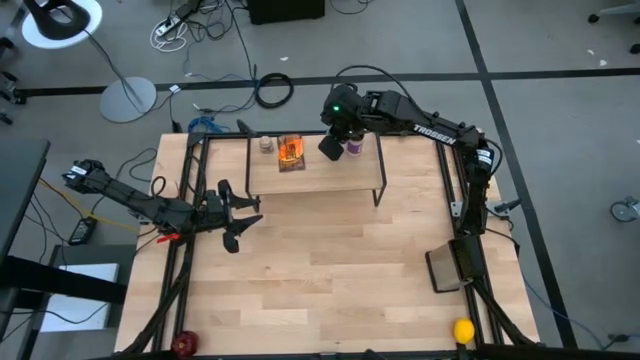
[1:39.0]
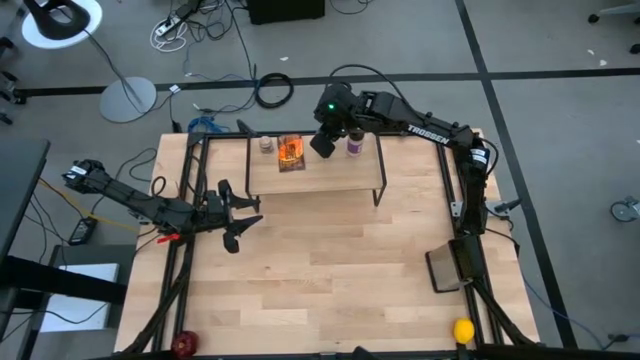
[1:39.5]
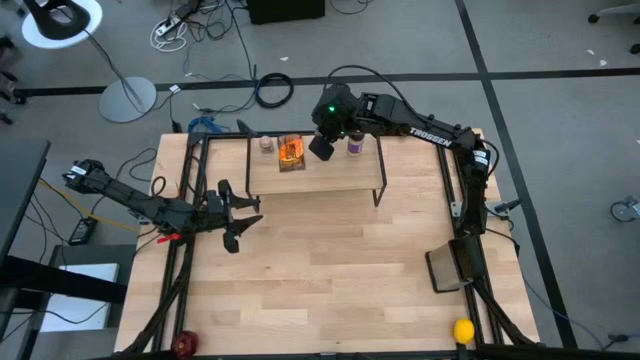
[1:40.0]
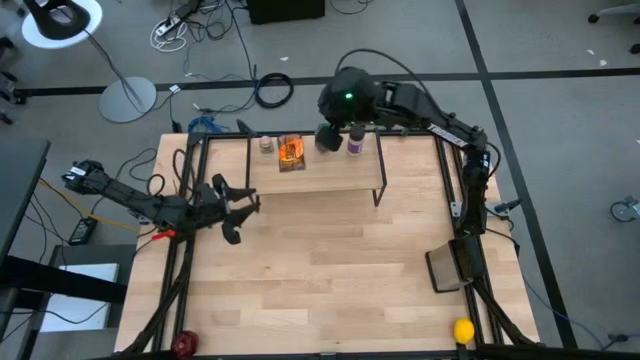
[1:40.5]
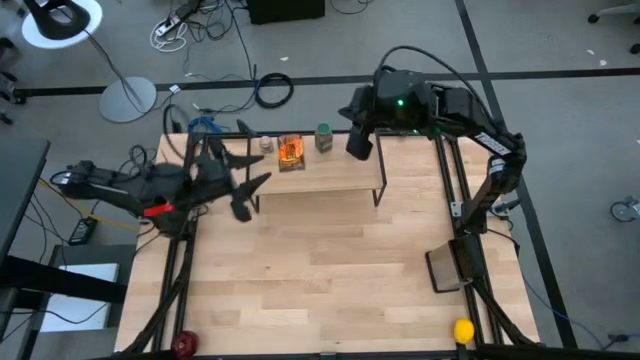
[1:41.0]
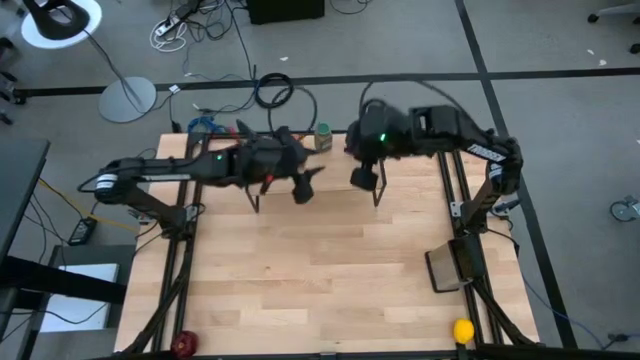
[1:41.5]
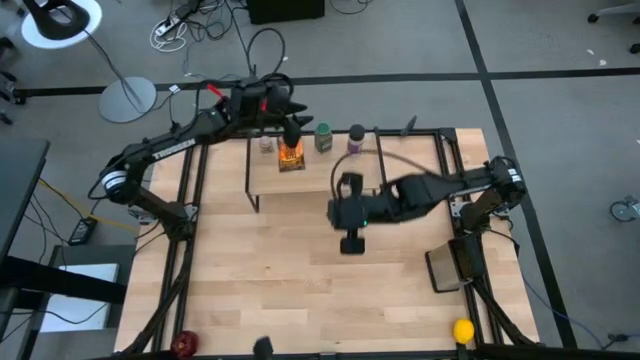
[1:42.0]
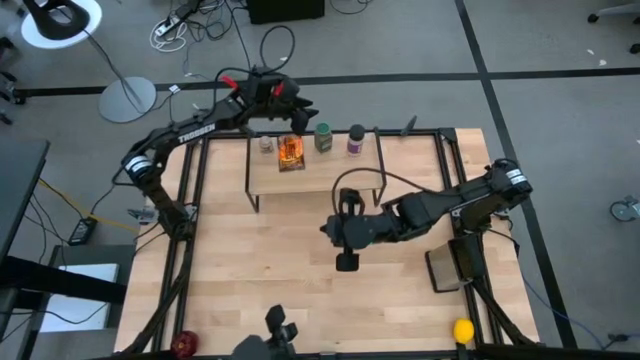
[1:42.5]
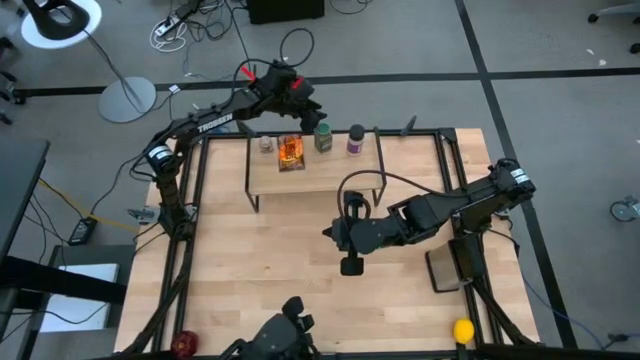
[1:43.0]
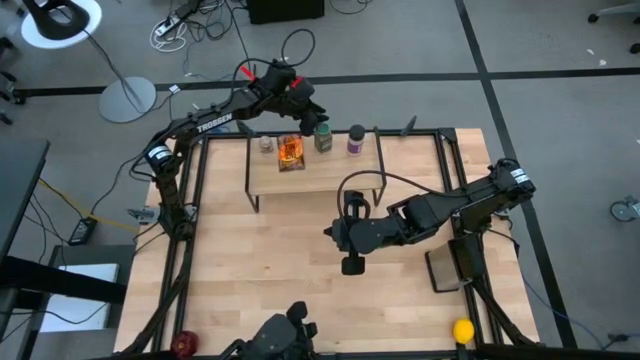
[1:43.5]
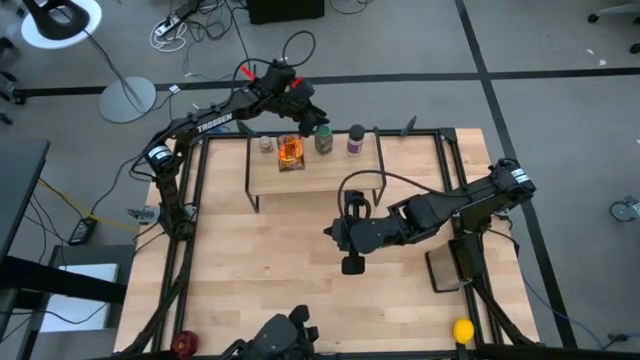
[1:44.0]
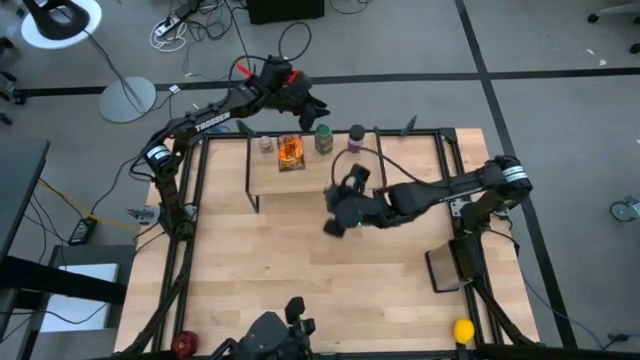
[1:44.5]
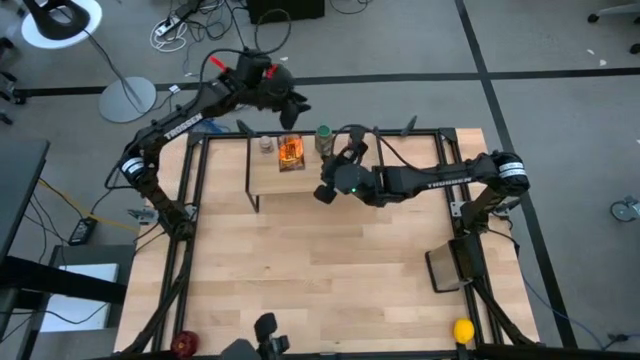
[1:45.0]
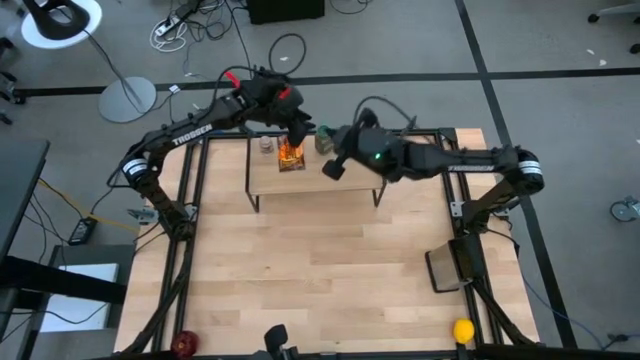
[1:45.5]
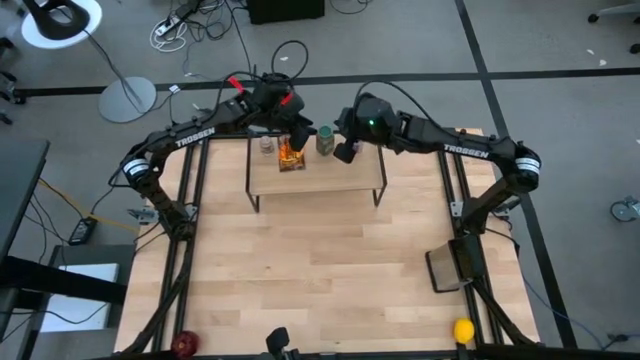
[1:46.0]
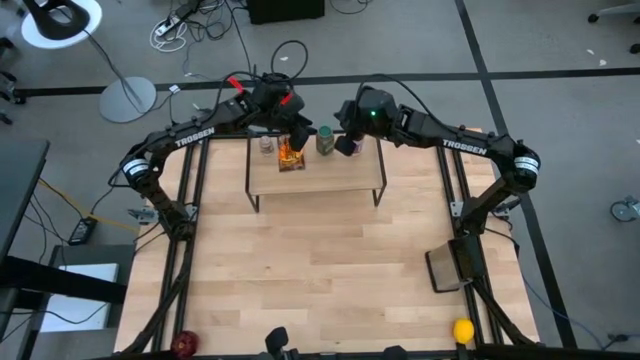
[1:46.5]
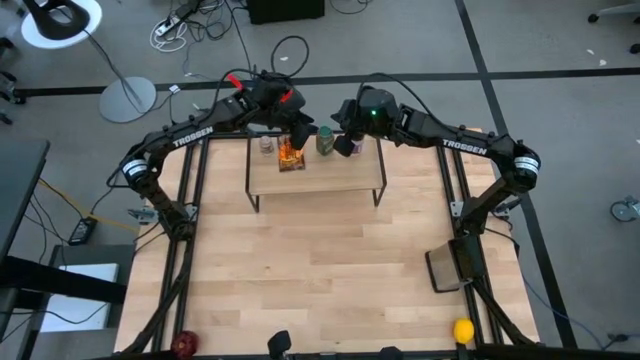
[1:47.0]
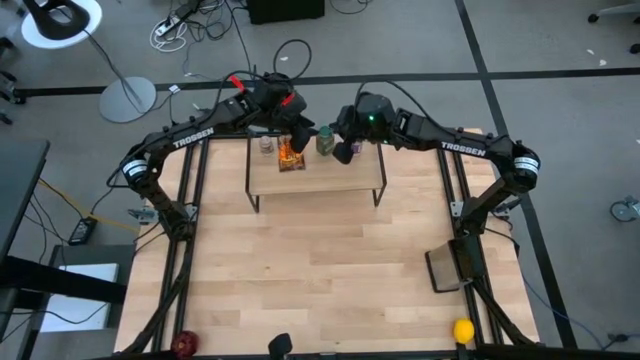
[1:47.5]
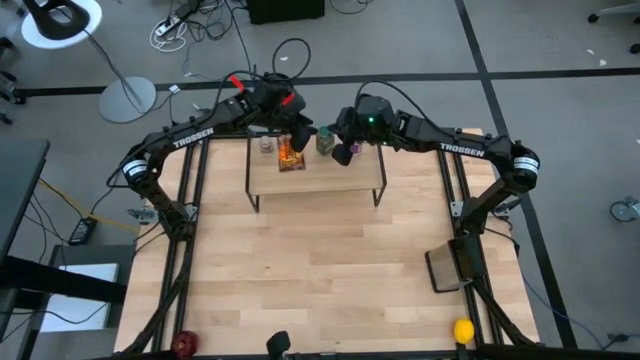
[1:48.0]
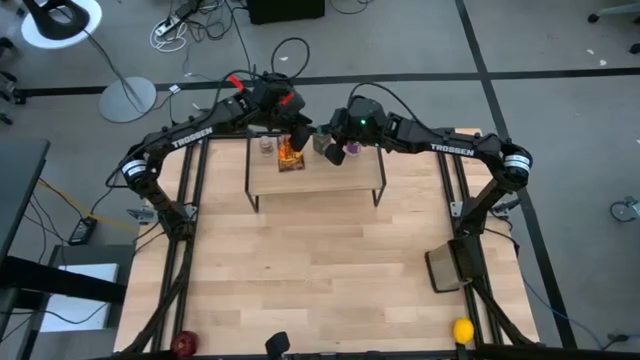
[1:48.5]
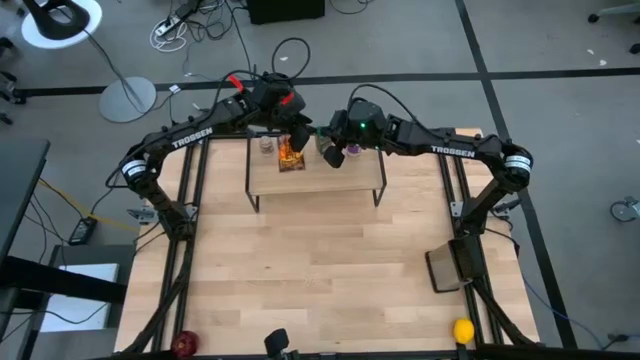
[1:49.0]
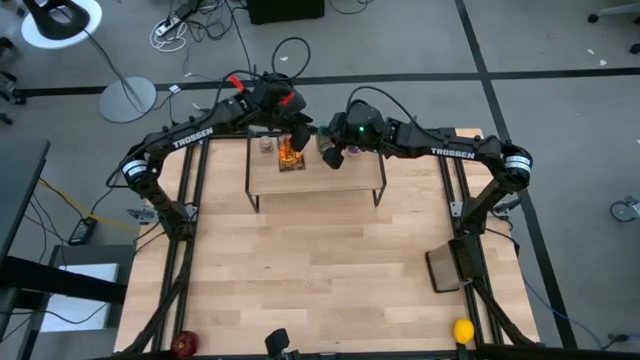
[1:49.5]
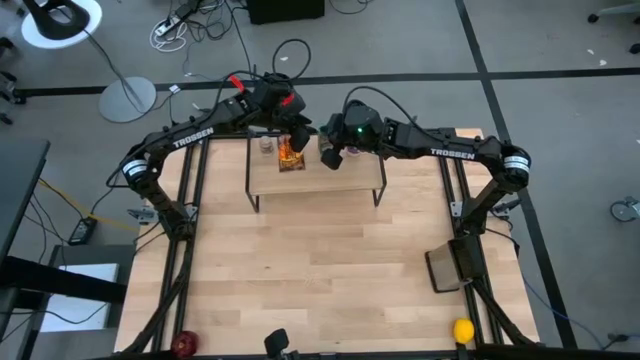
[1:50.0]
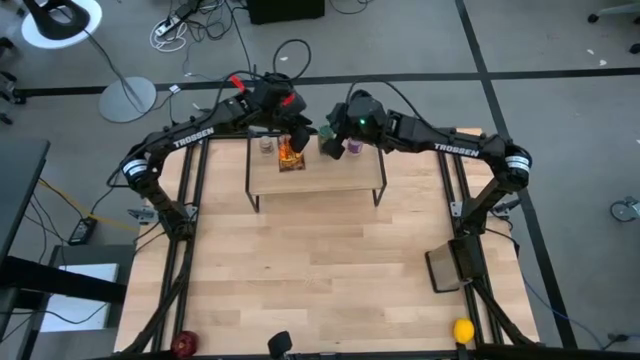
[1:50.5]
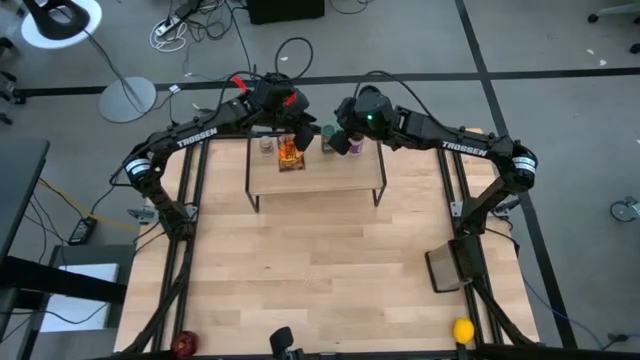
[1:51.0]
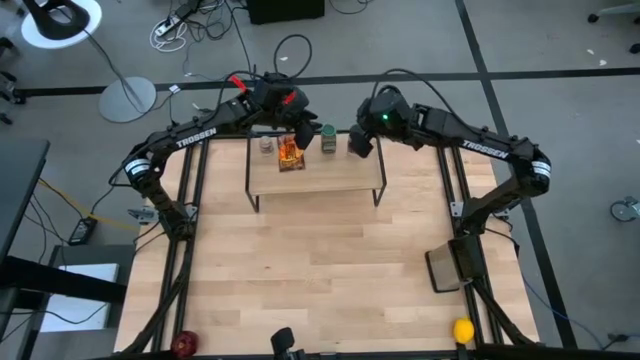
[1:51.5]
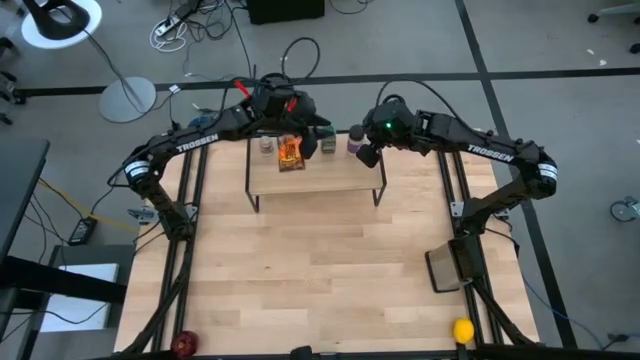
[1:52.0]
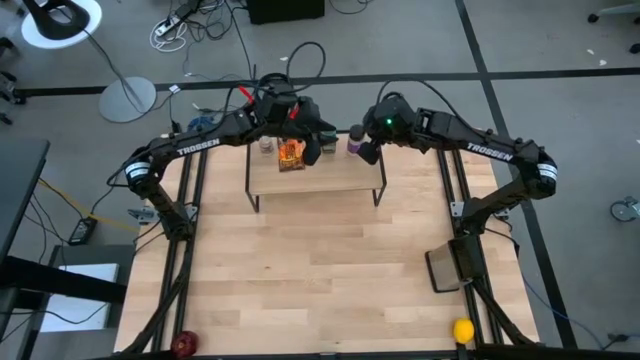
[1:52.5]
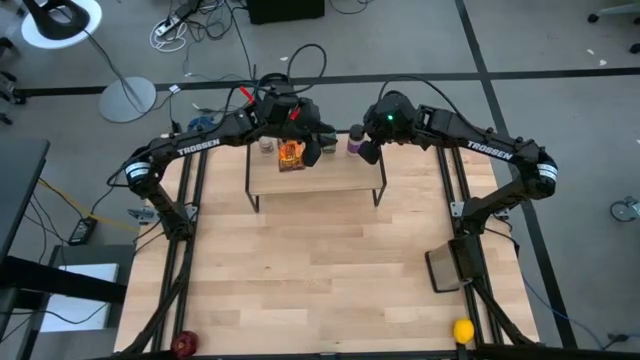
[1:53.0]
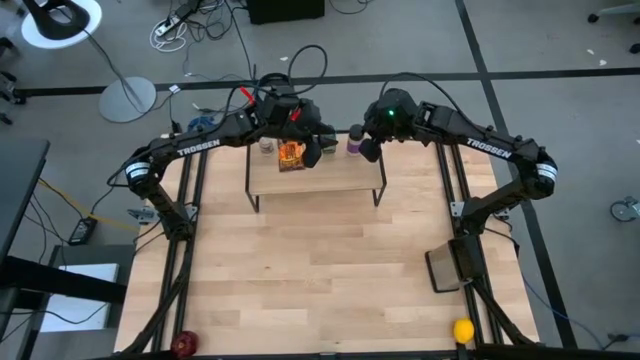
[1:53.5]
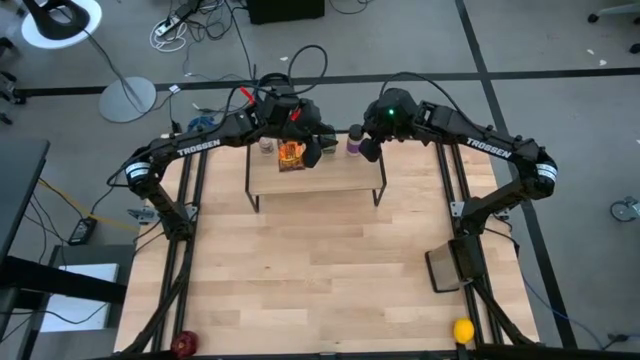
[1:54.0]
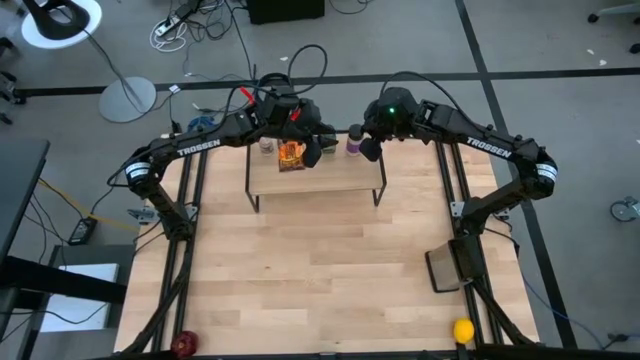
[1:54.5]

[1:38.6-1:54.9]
Task: Shelf spices
Adjust the seasoning bottles on the shelf

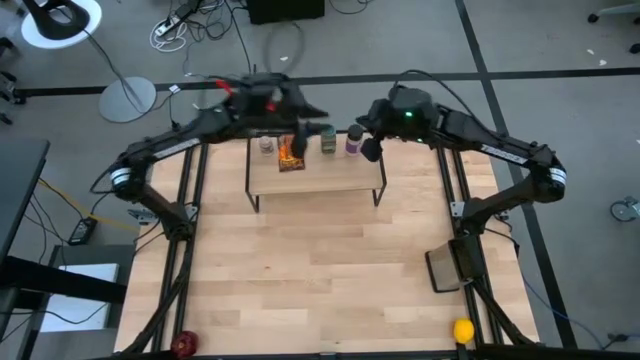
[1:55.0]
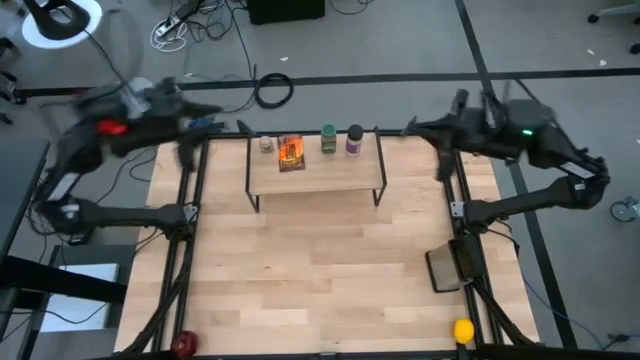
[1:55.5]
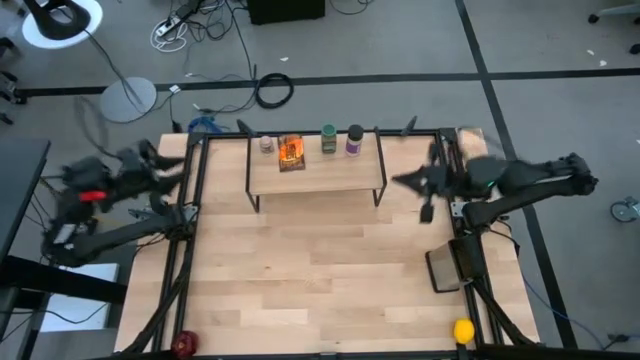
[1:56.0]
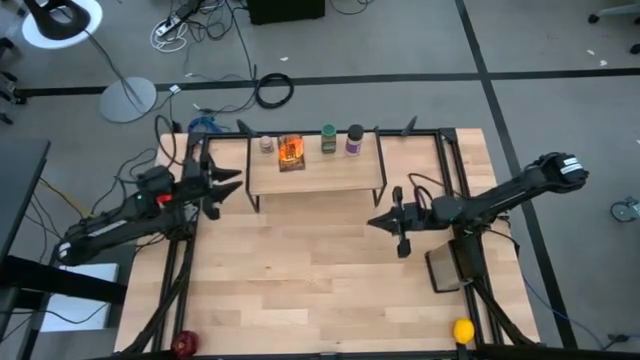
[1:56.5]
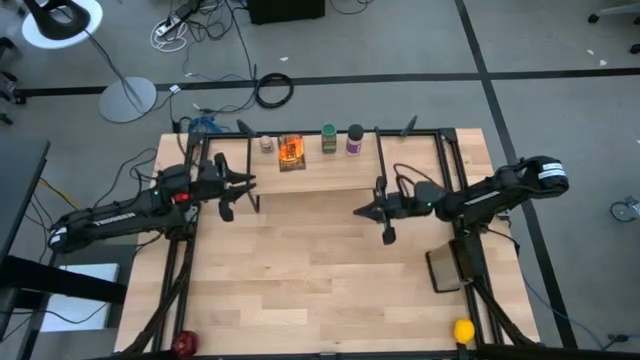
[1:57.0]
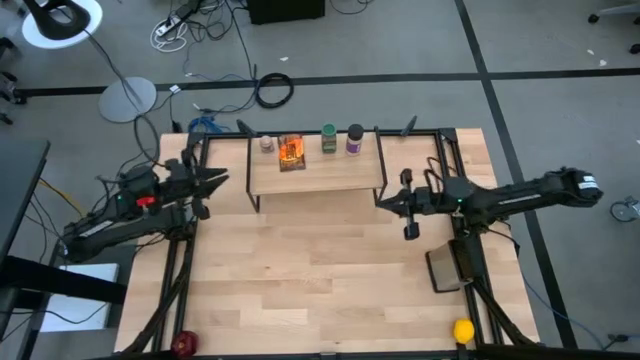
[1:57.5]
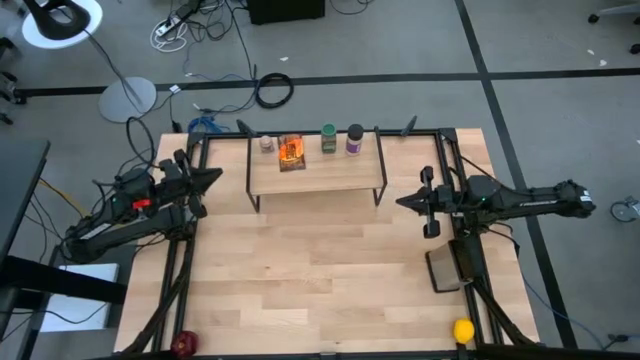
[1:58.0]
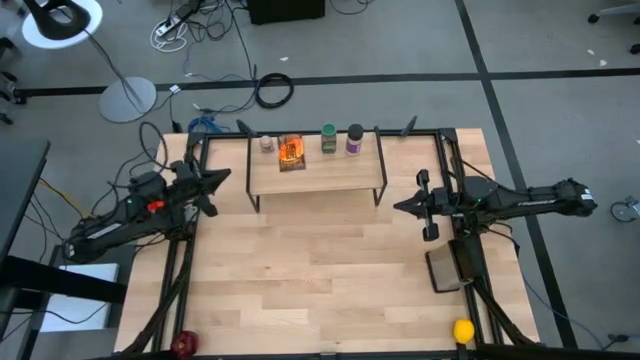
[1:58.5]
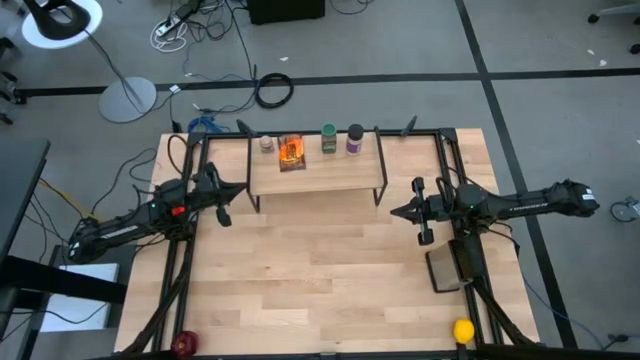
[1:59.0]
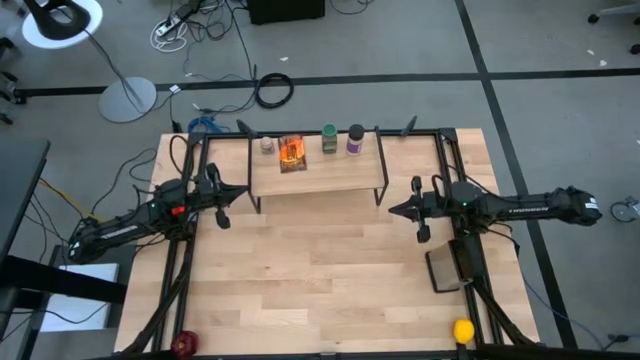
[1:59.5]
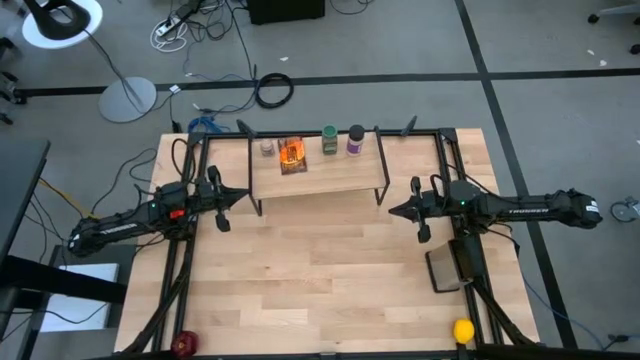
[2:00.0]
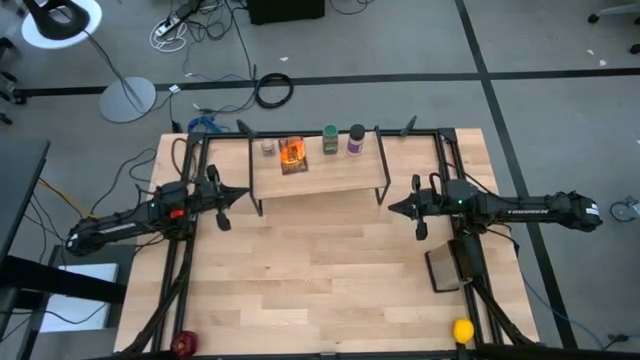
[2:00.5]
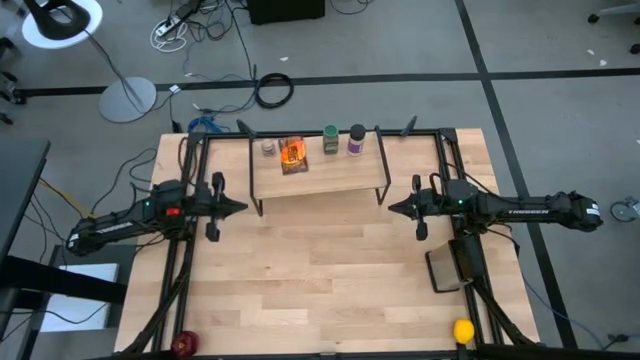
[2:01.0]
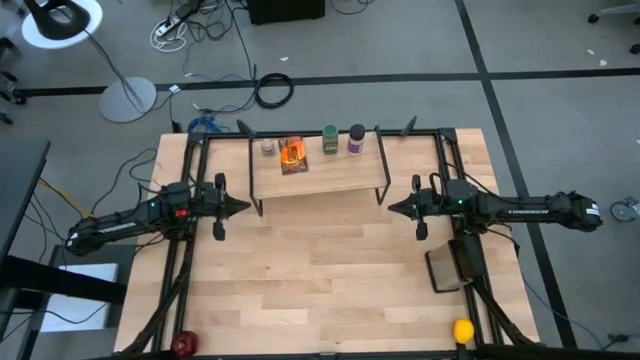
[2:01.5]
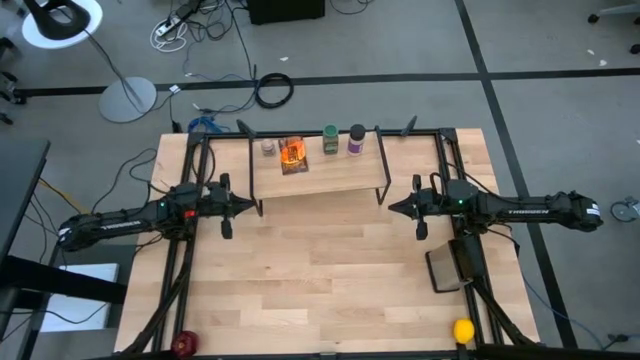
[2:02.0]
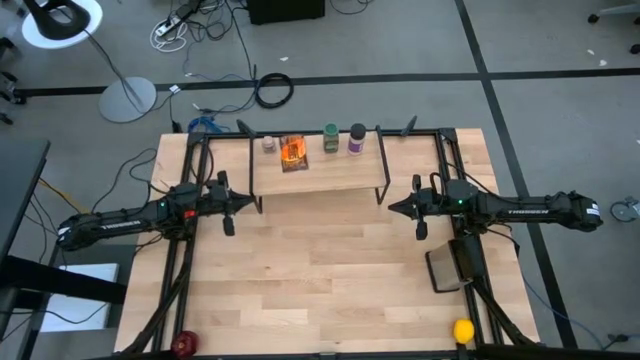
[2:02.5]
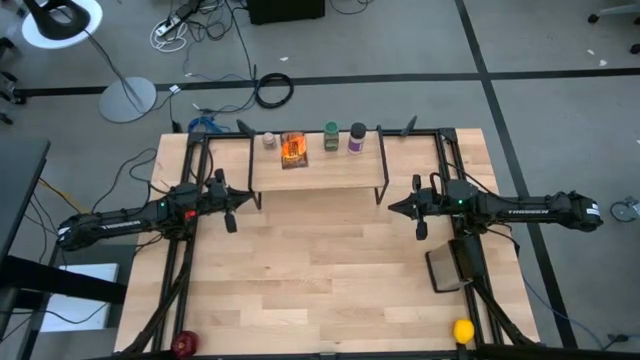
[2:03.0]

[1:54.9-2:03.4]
Adjust the shelf
